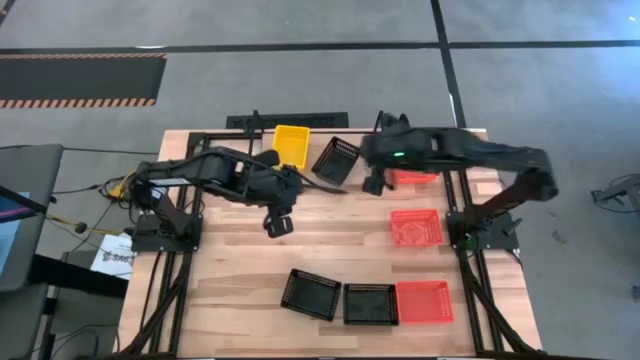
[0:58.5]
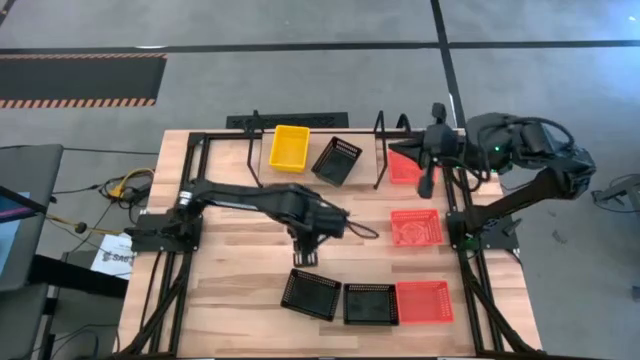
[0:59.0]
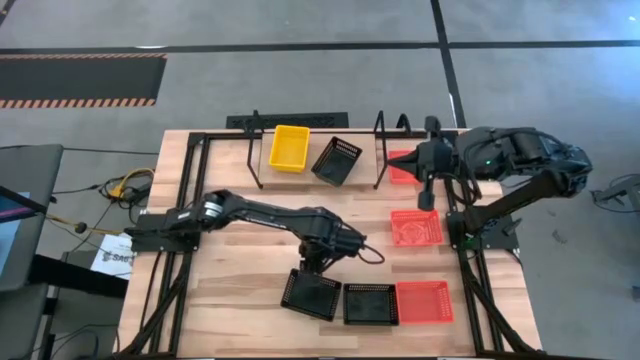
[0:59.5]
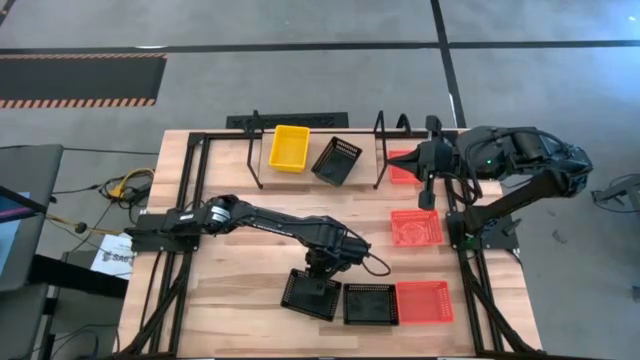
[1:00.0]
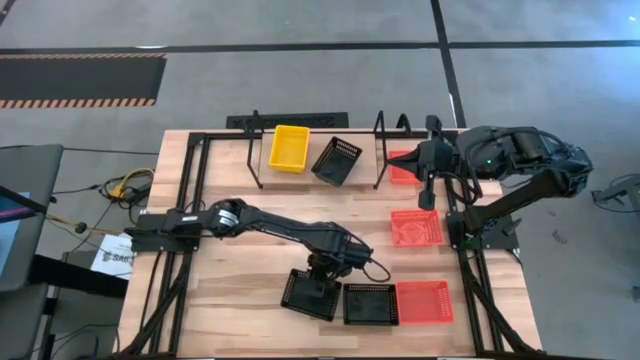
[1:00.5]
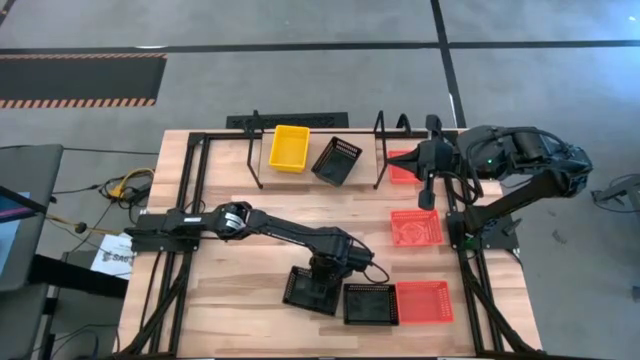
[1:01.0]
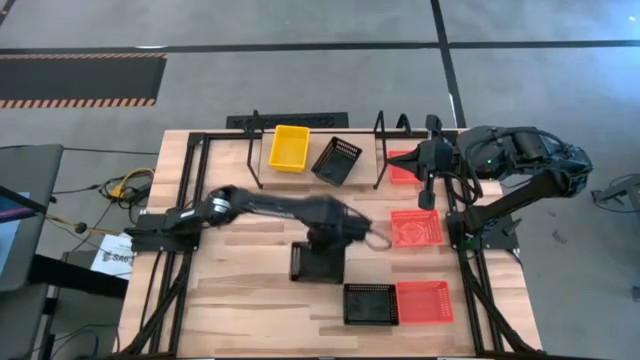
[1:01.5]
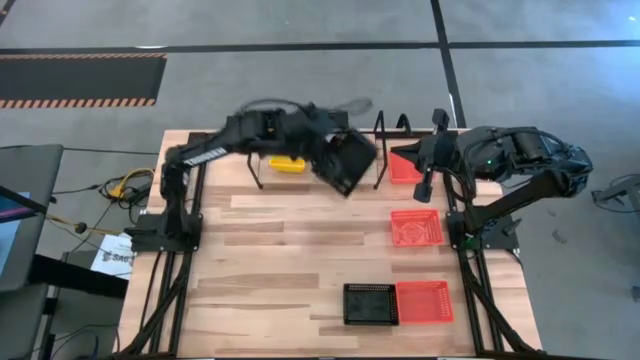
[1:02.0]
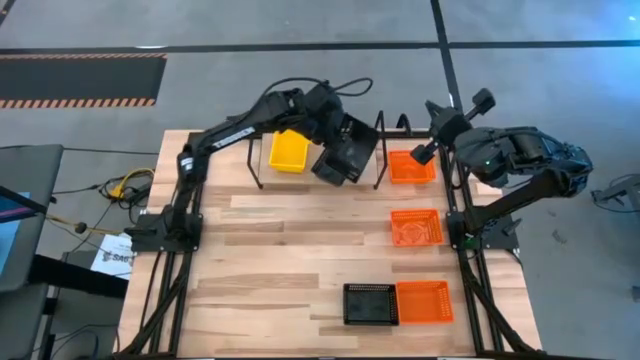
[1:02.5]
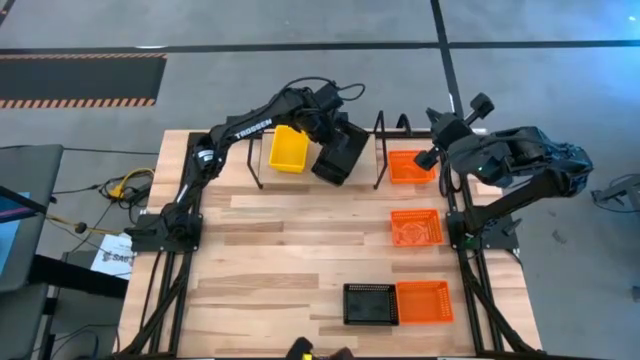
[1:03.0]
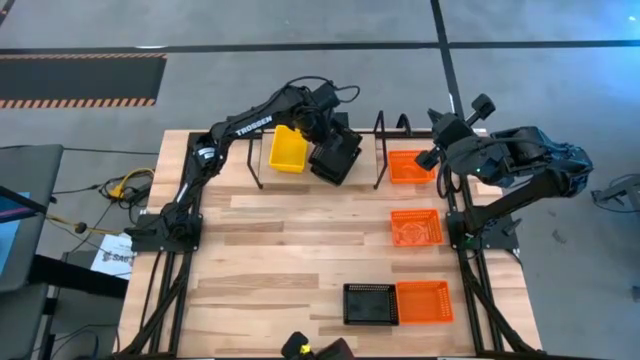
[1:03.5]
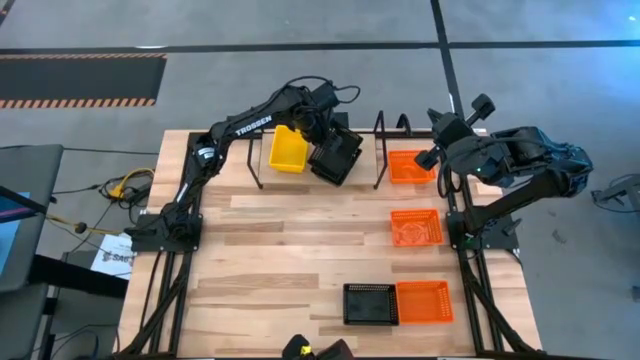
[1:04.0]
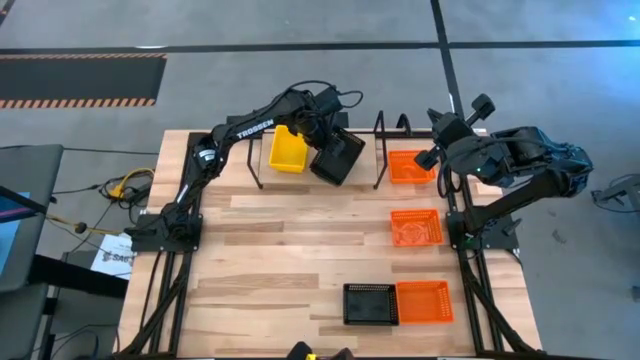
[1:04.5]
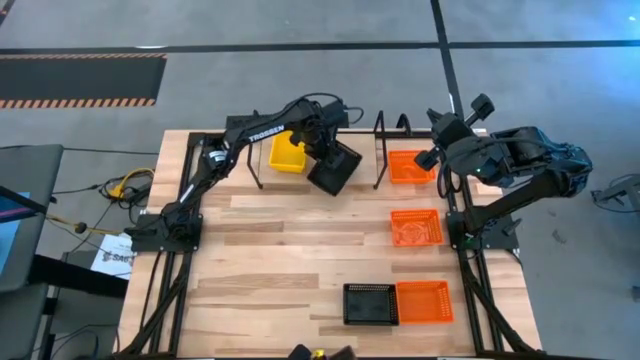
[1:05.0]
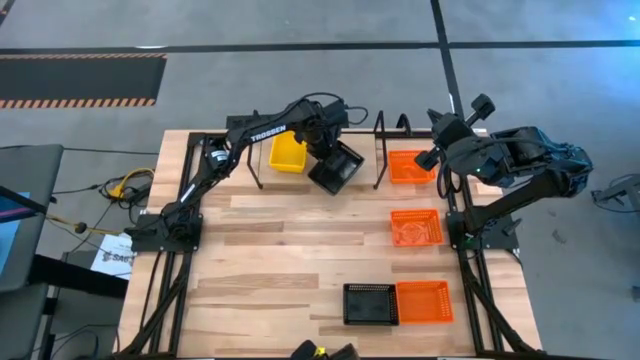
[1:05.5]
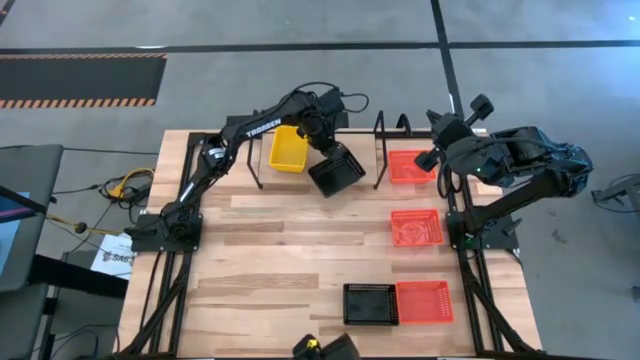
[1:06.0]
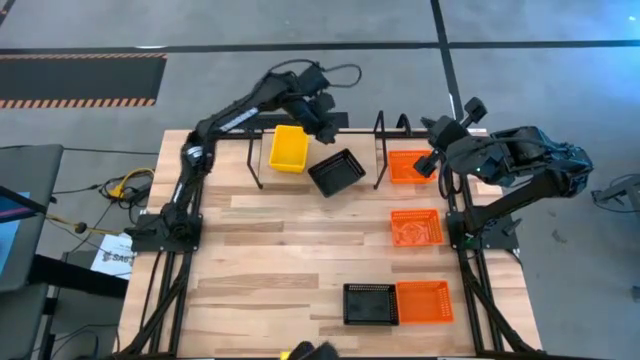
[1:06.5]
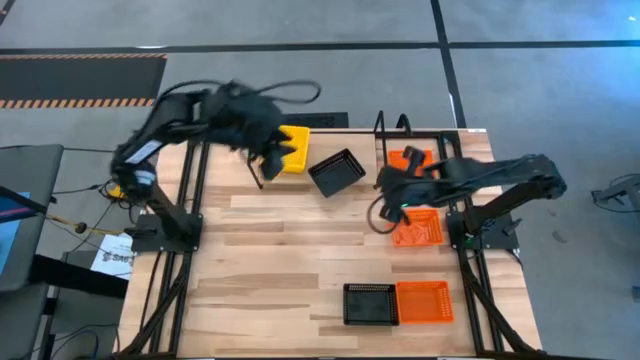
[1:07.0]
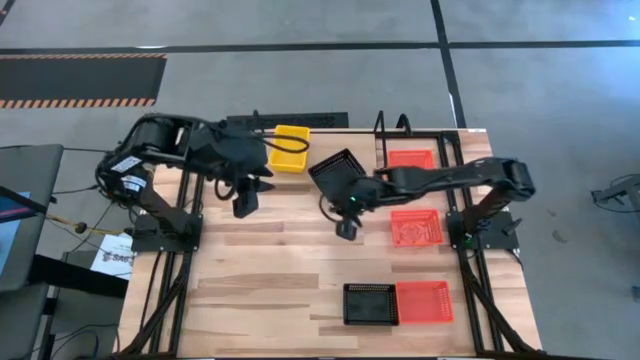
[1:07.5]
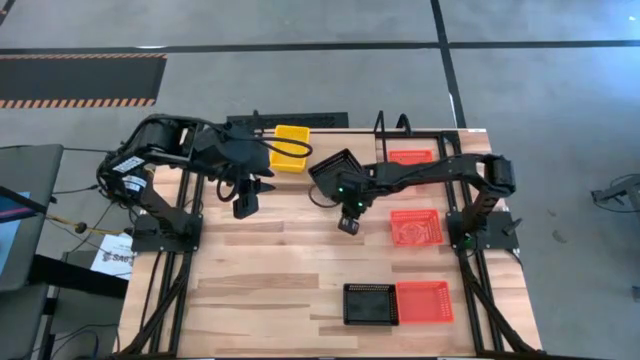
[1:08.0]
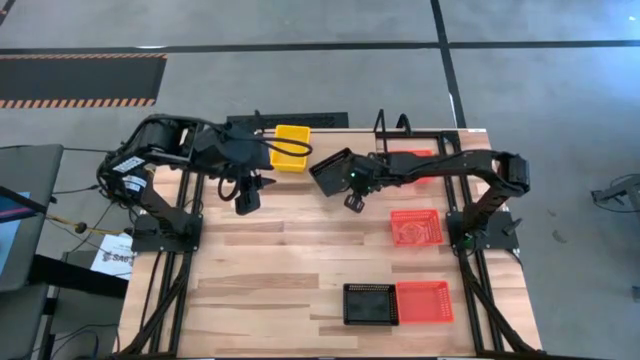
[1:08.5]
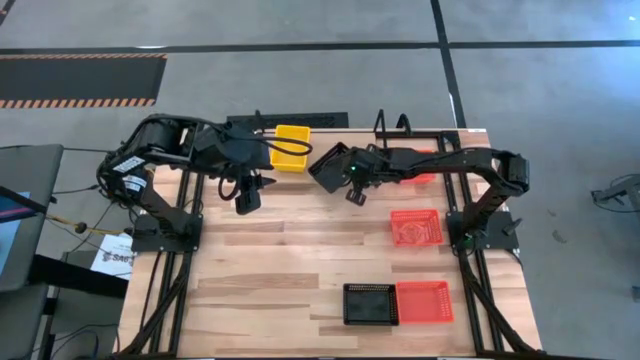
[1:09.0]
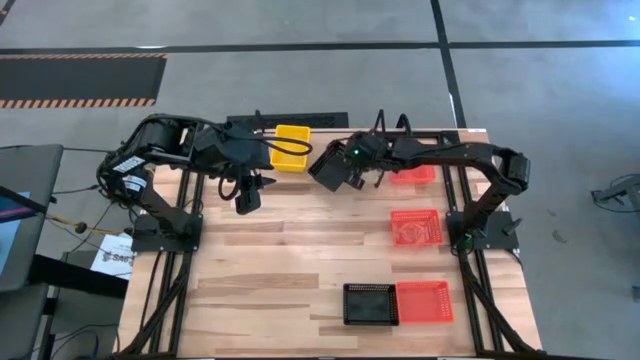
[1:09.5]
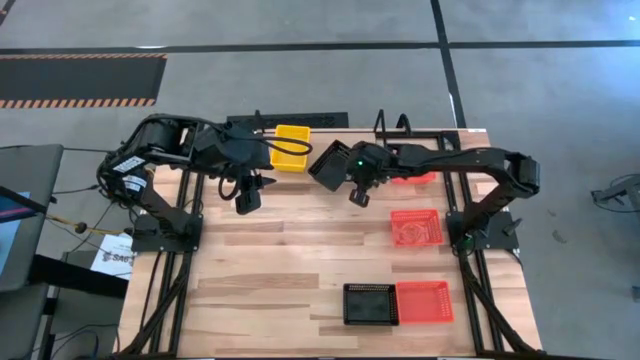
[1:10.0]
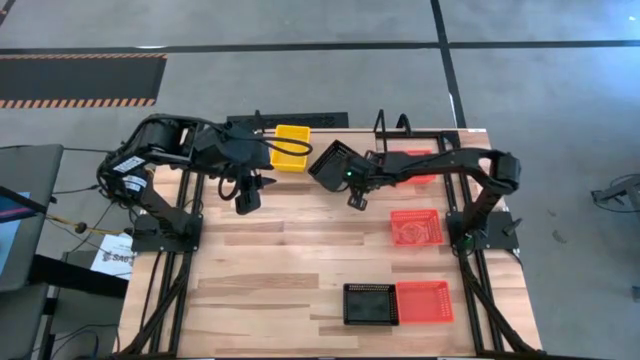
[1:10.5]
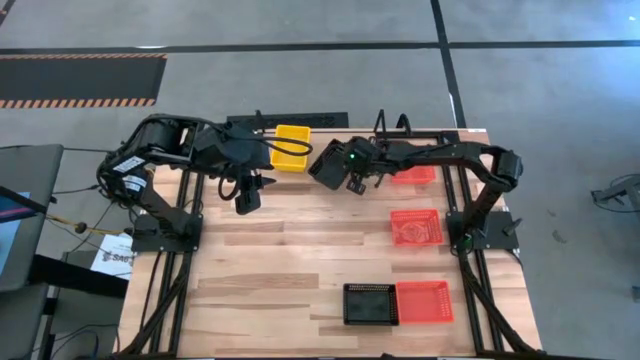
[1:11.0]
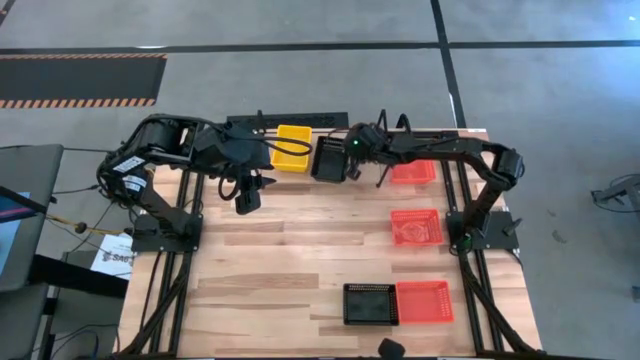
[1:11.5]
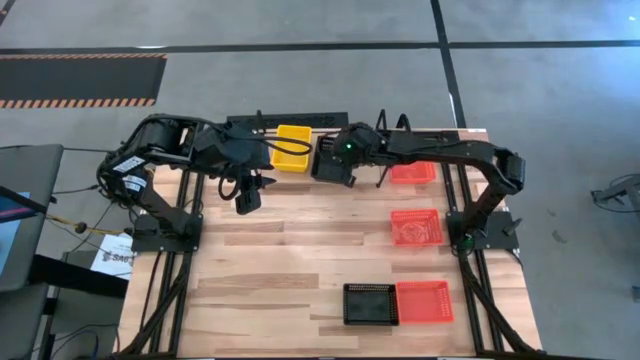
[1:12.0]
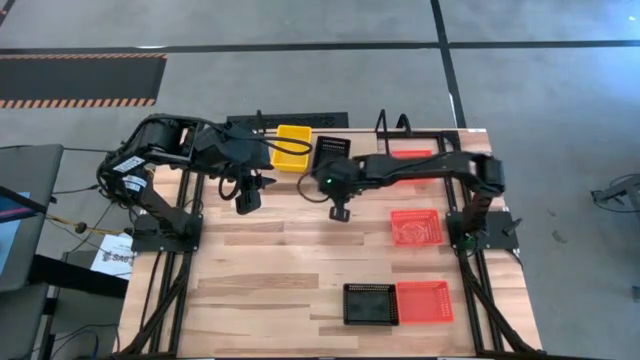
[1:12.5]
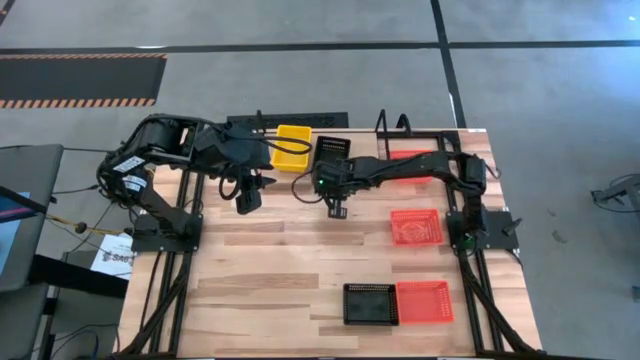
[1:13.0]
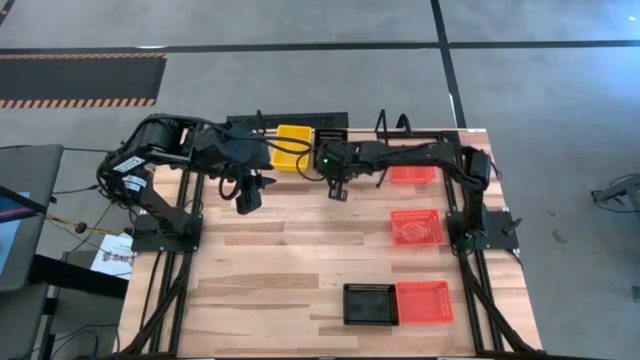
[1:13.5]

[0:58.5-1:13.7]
Task: Stack baskets on shelf by color
Stack the left black bin on top of the other black bin on the shelf

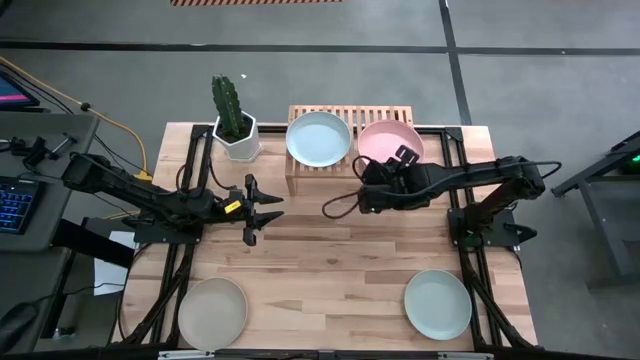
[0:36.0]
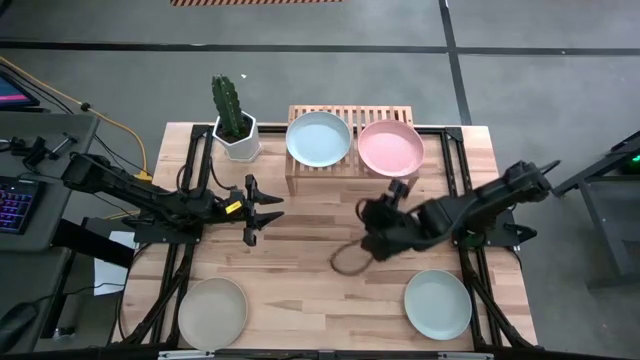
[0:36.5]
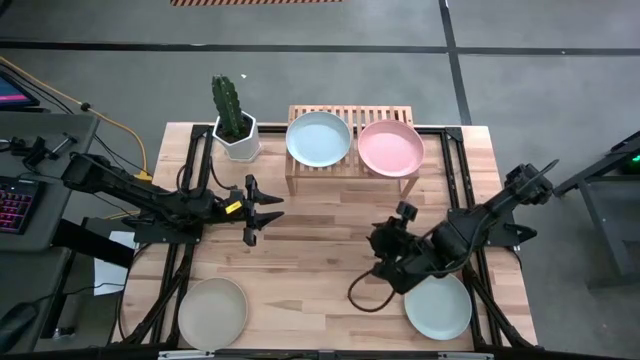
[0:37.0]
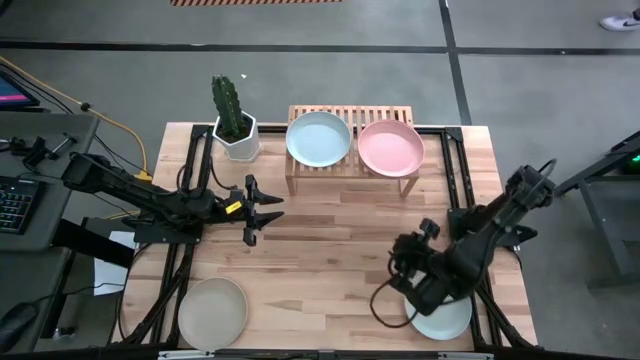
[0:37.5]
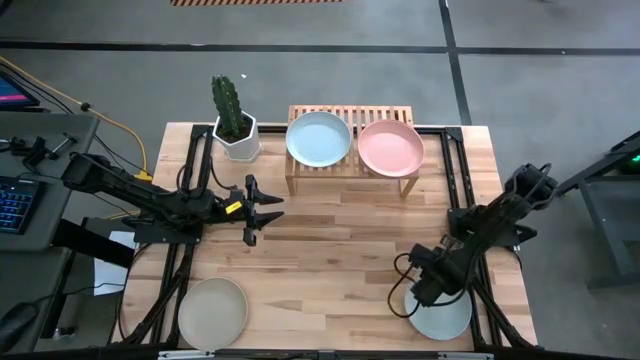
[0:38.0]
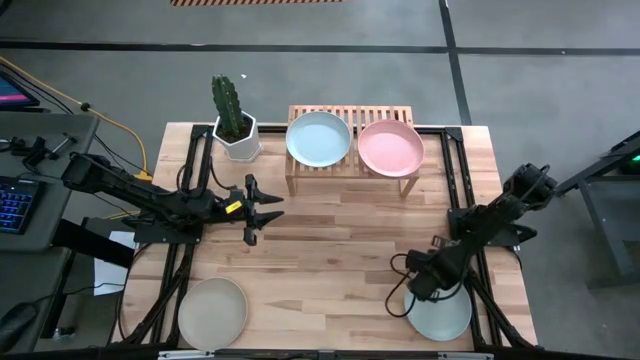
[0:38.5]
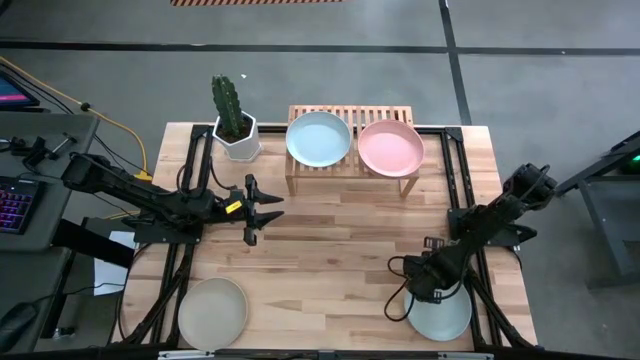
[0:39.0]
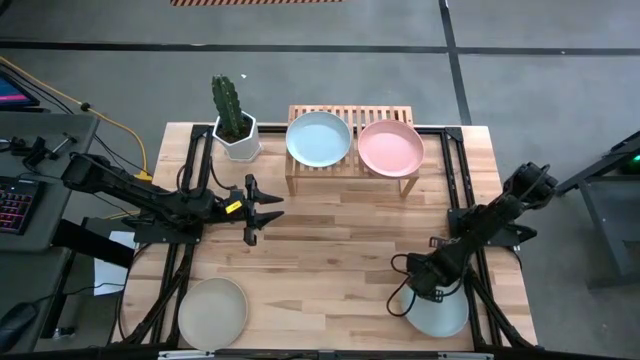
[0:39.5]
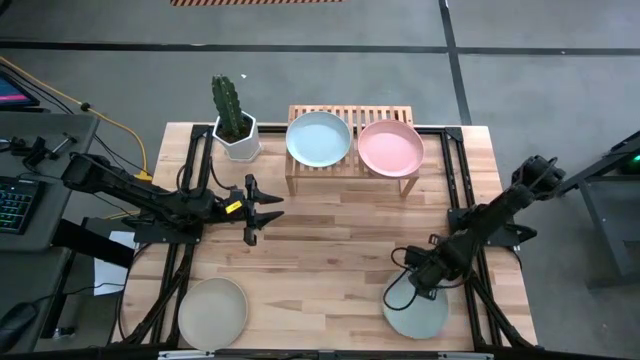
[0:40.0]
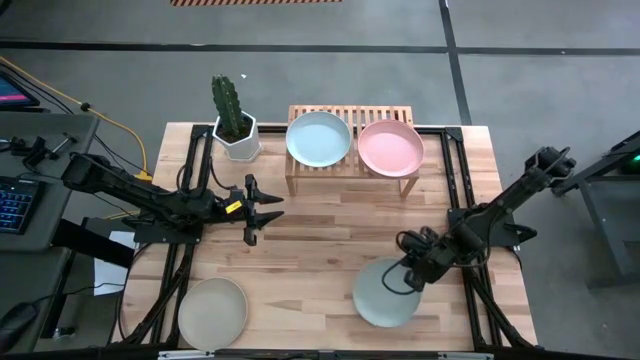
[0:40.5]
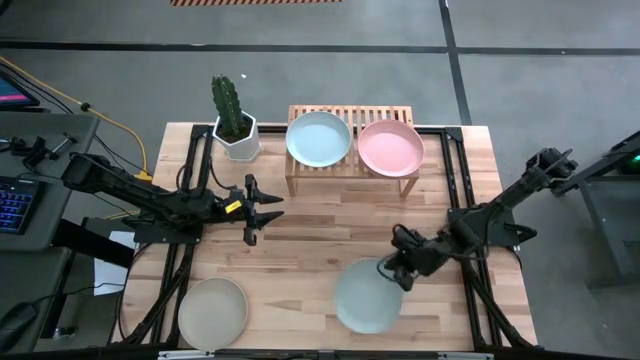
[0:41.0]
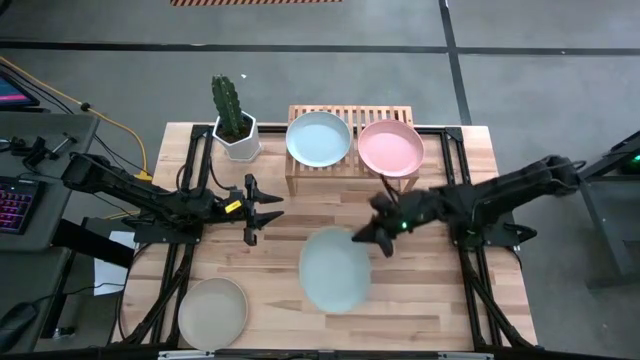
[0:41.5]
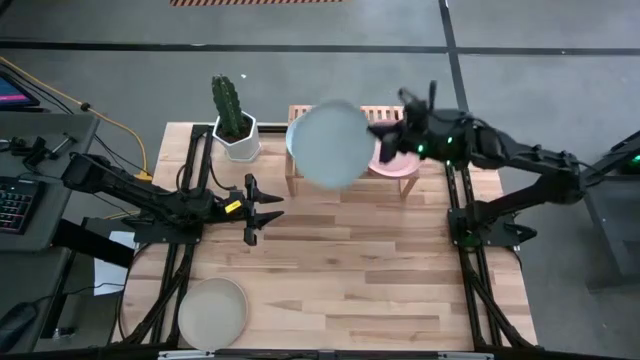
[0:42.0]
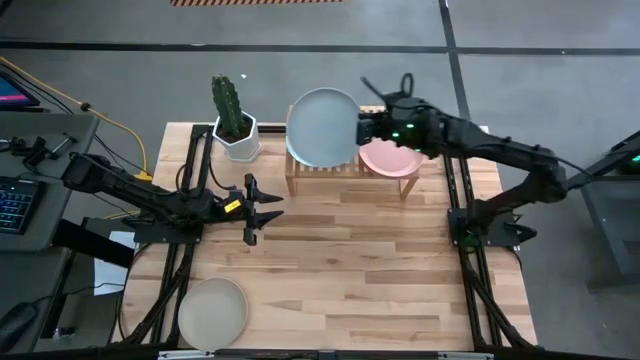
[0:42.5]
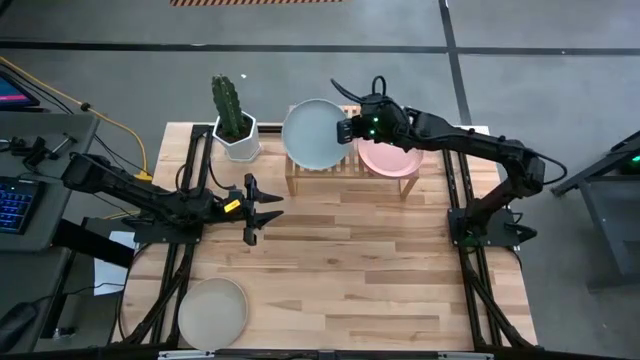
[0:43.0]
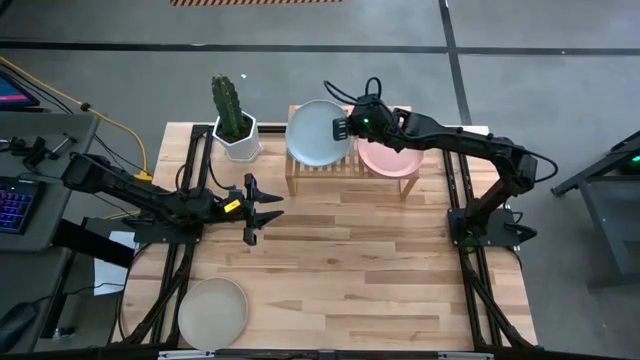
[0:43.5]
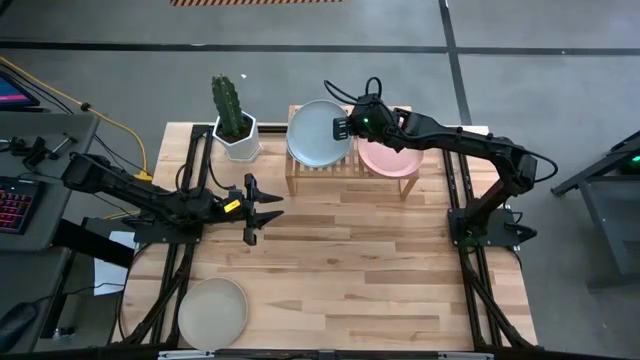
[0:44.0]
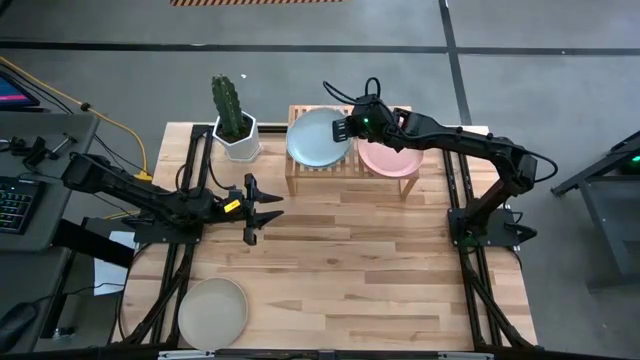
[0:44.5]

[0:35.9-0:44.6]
Task: Place and stack plates onto a shelf
Stack the blue plate on top of the other blue plate on the shelf
